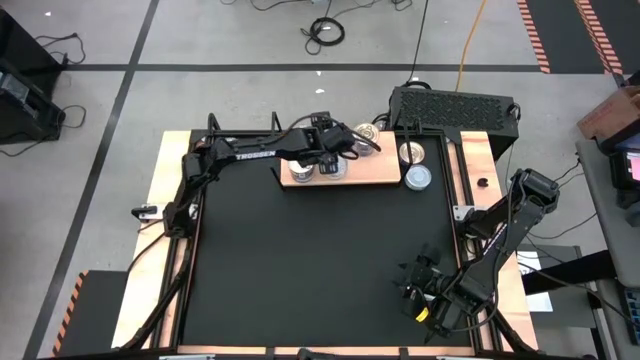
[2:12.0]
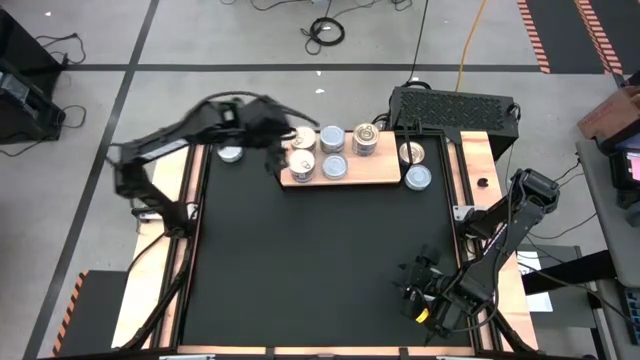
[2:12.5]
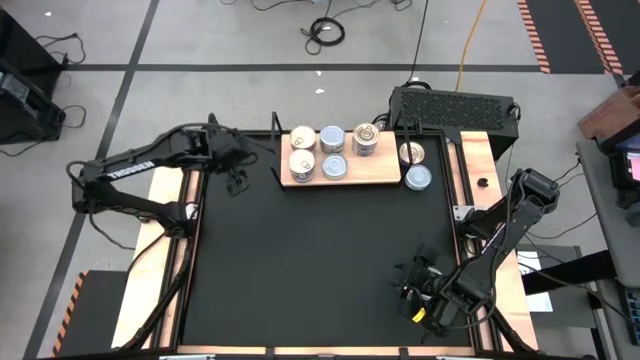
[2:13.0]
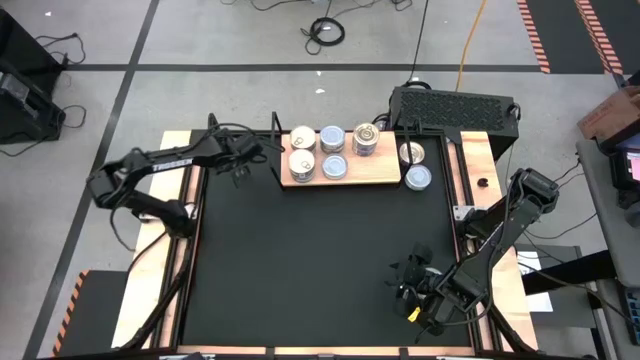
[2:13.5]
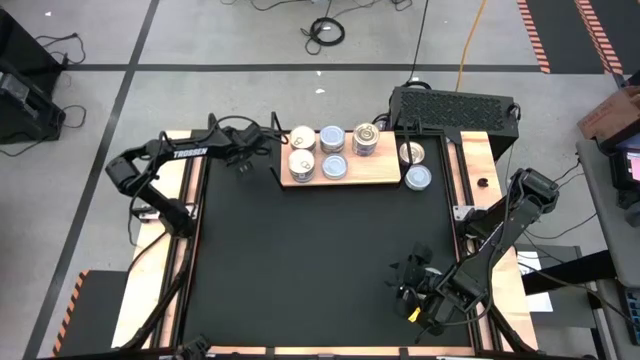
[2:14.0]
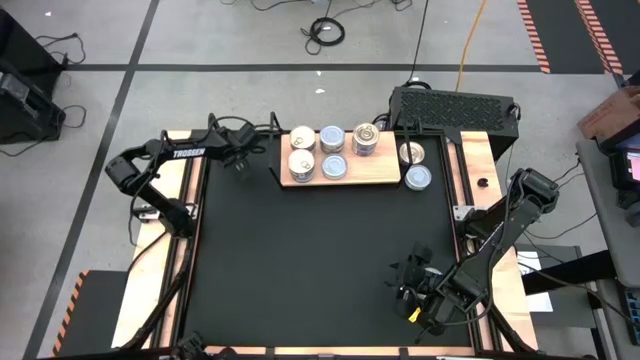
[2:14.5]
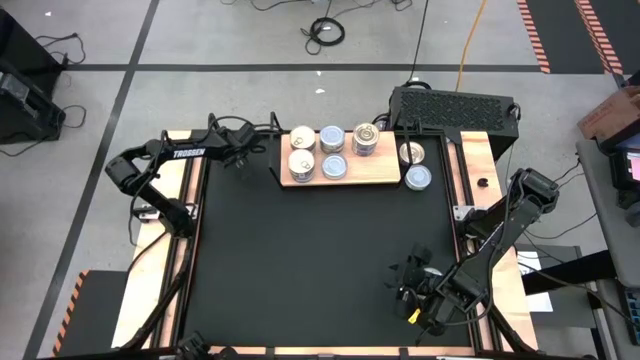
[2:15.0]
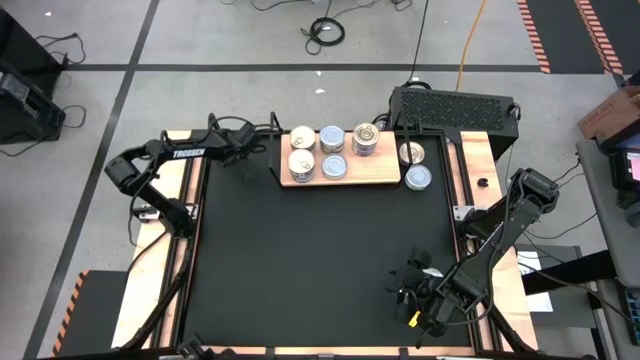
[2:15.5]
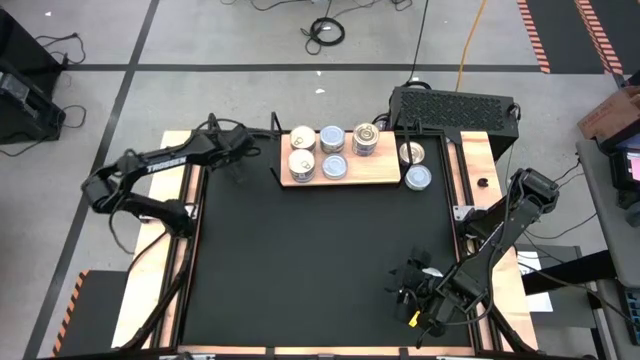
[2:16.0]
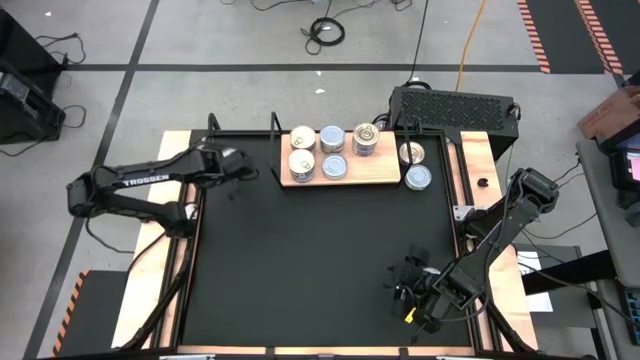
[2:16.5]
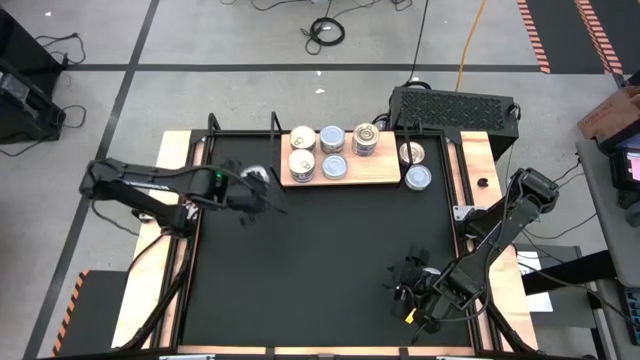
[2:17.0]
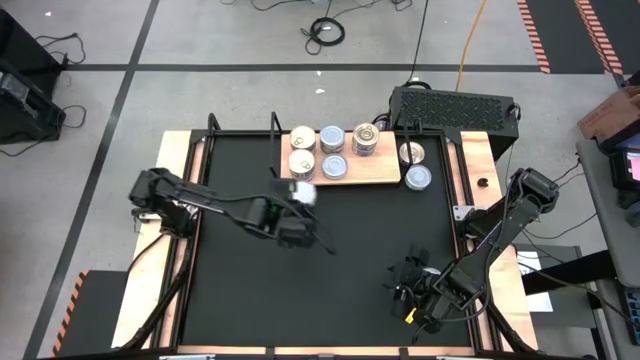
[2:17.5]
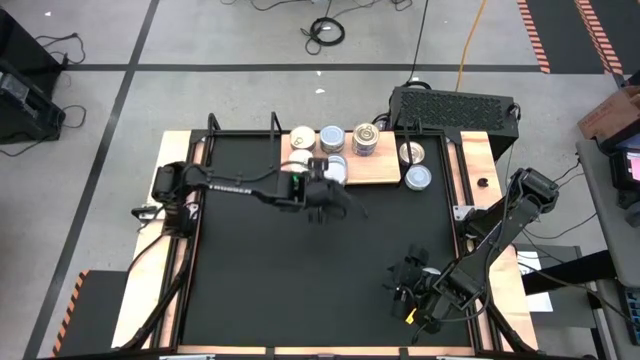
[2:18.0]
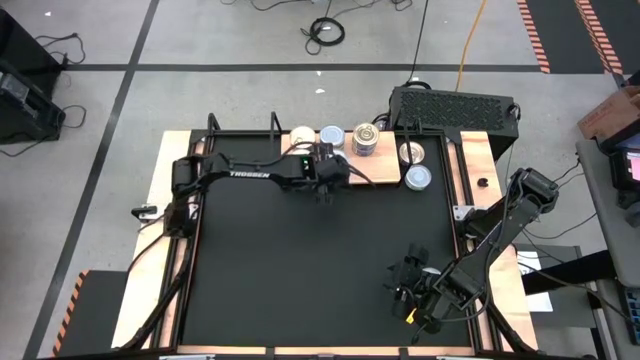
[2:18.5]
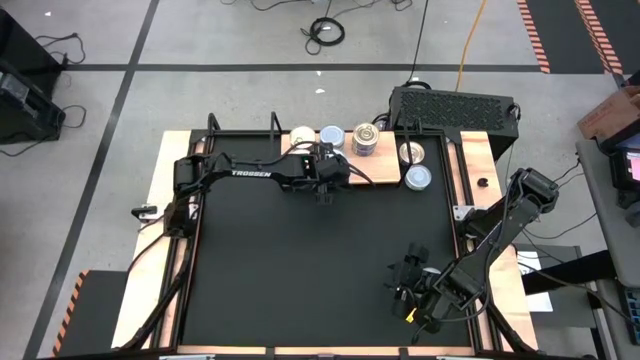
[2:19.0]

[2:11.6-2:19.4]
Task: Stack canned seafood by type on shelf
Stack the top left green tuna can on top of the green tuna can on the shelf

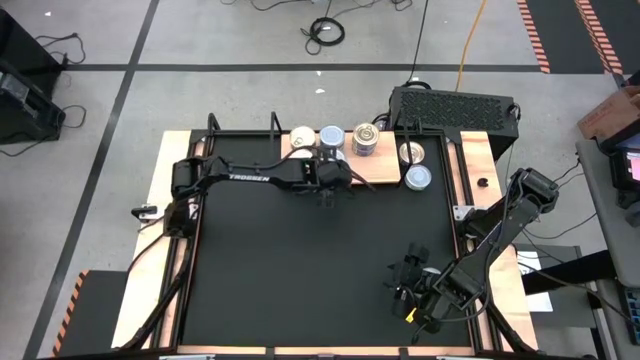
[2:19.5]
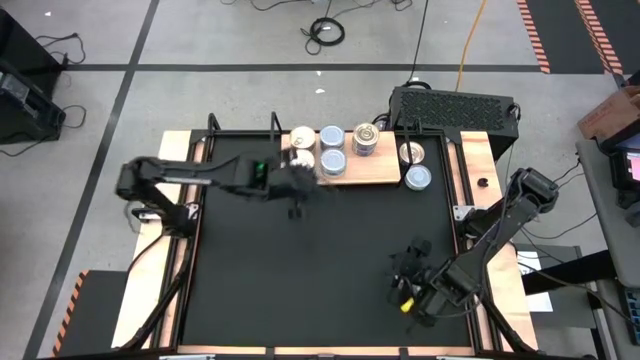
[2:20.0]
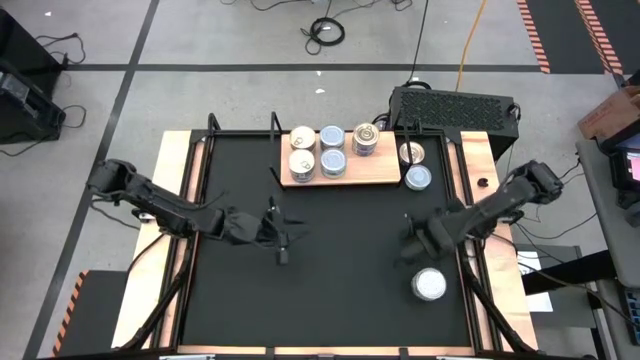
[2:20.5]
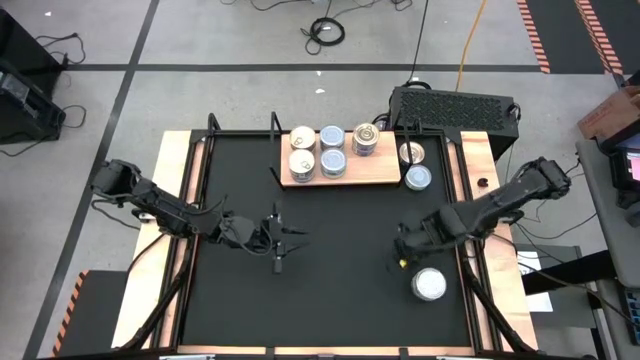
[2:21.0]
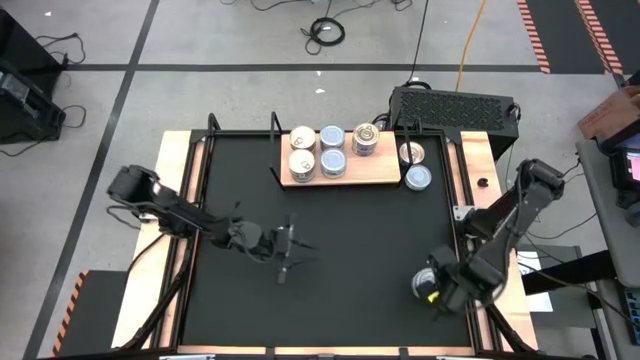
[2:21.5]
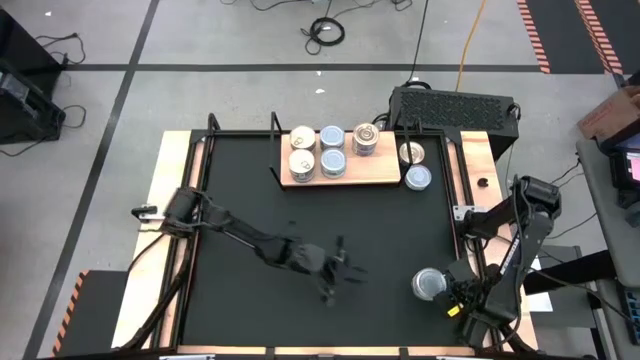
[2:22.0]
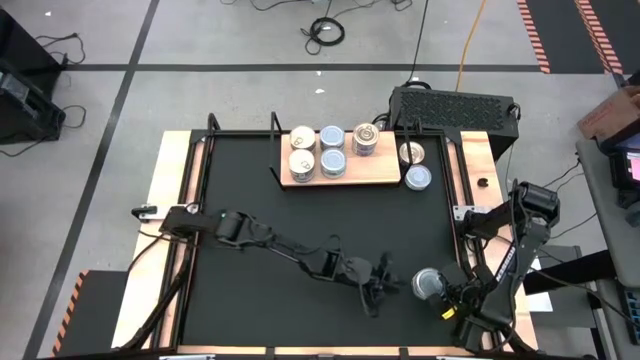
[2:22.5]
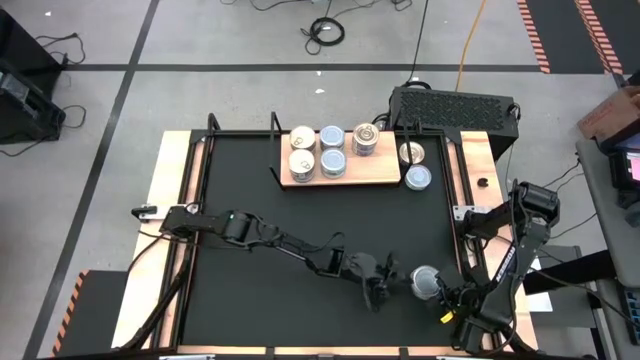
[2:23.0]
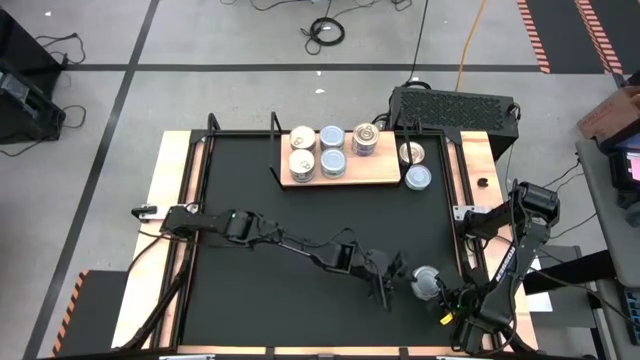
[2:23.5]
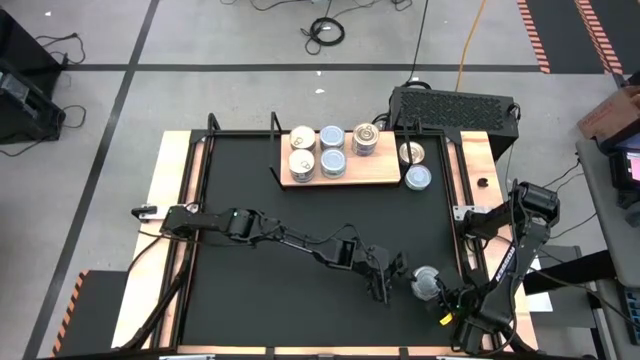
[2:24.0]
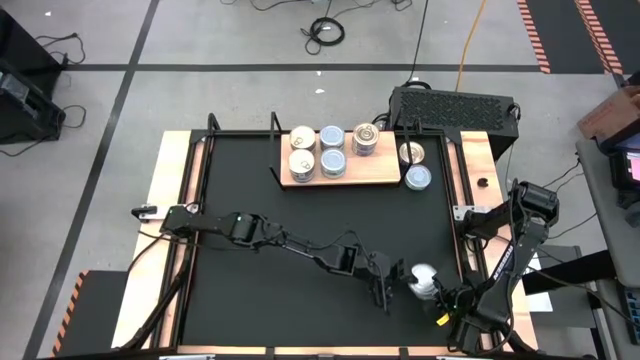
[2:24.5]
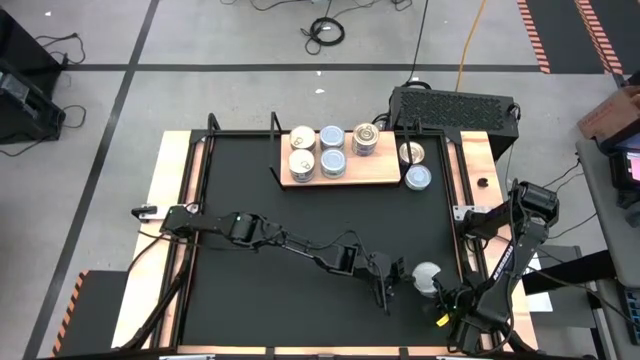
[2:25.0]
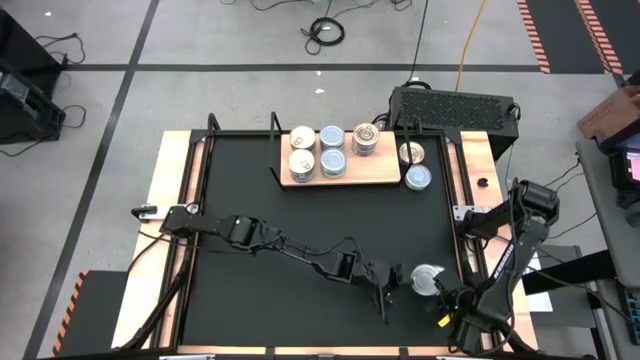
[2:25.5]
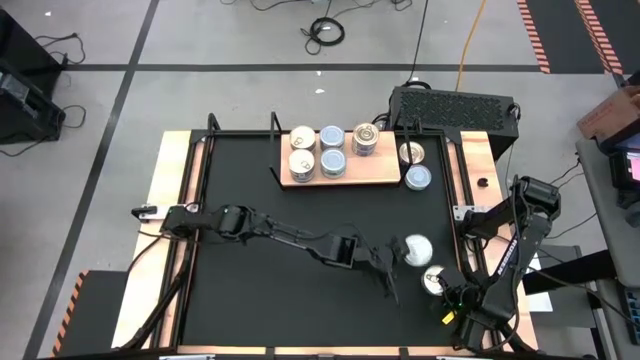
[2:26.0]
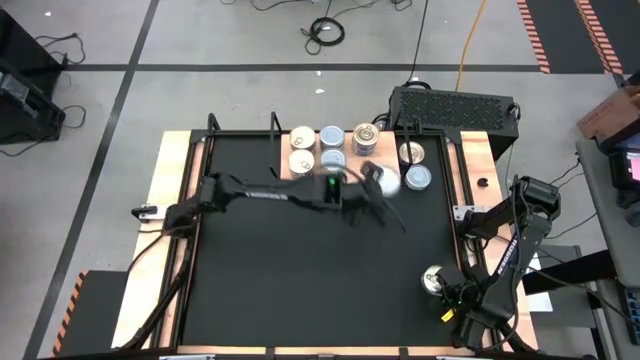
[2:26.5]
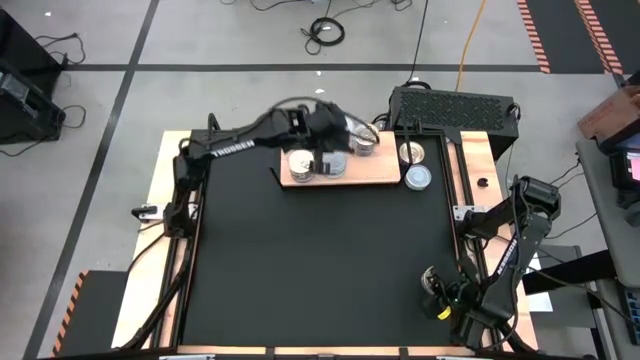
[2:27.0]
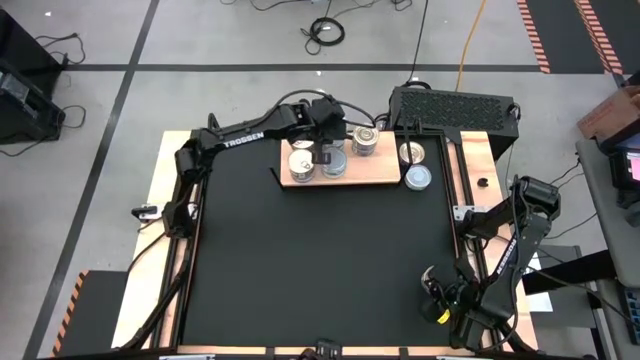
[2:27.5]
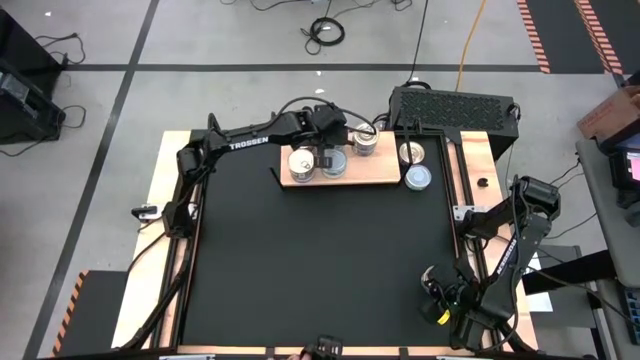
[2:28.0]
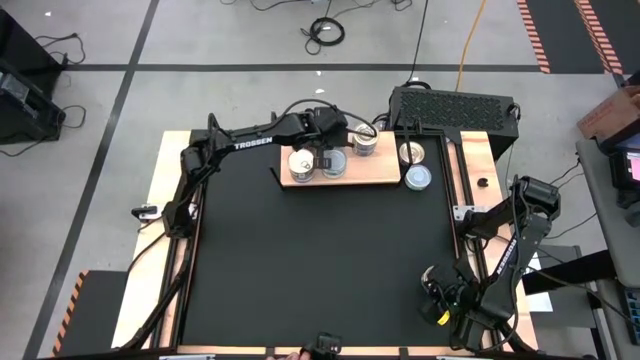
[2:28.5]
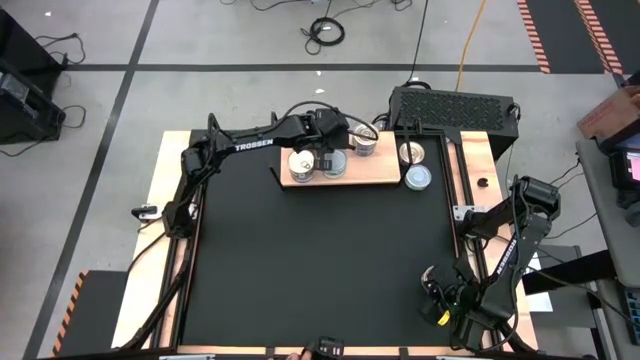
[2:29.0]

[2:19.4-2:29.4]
Stack the bottom green tuna can on top of the green tuna cans on the shelf
